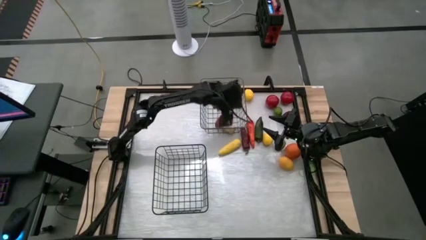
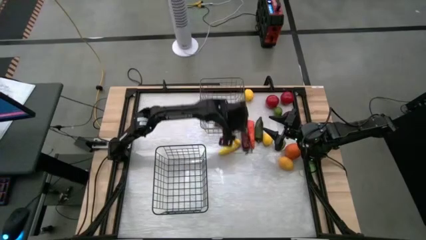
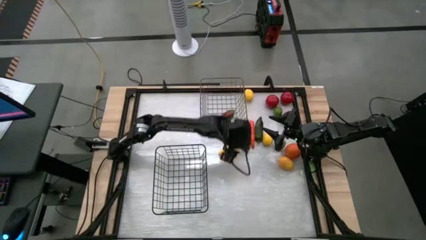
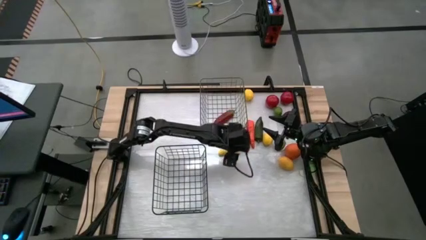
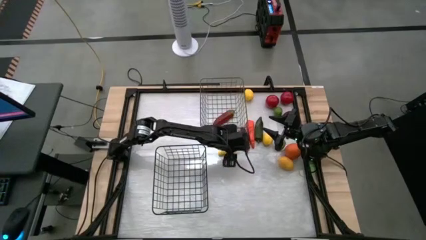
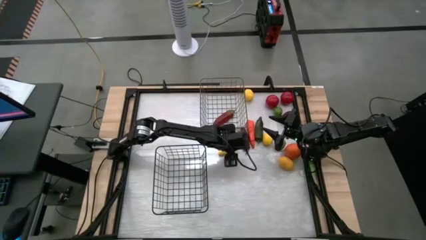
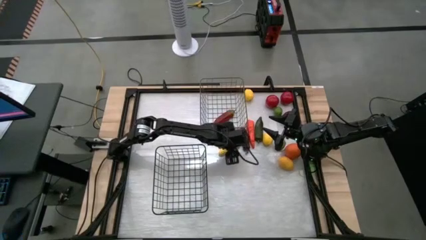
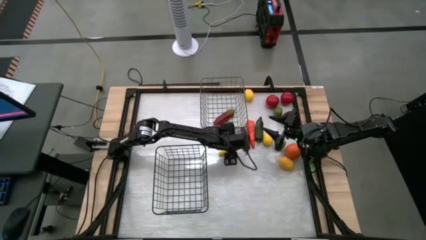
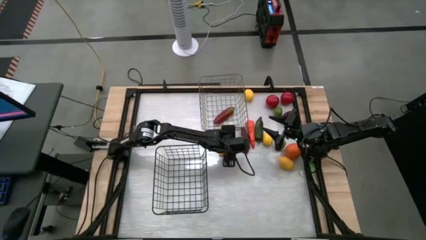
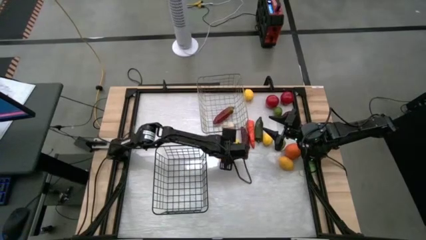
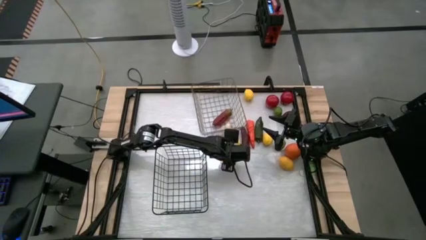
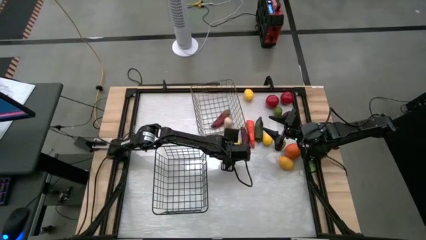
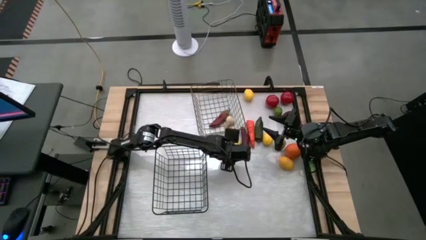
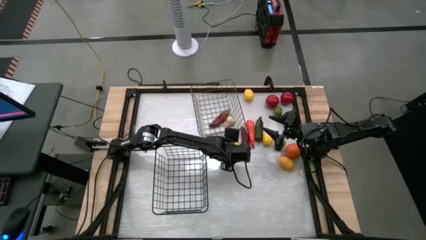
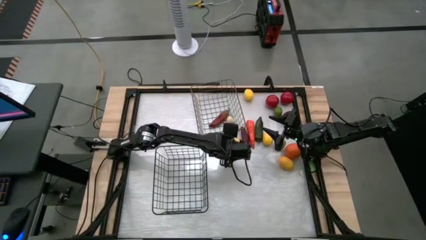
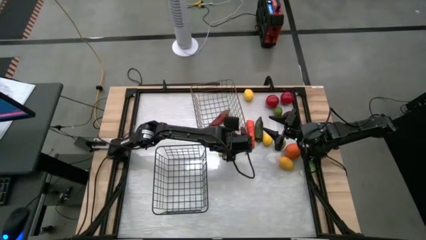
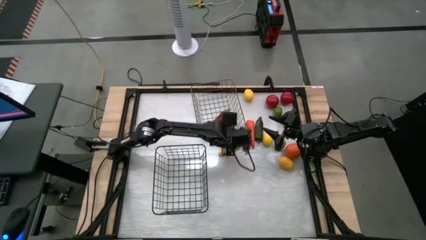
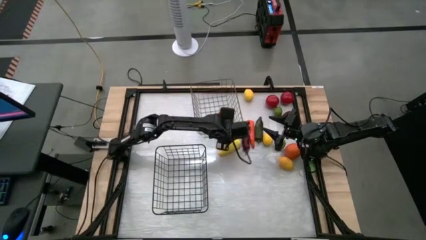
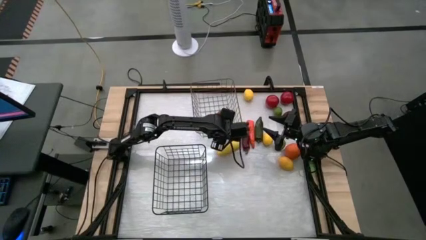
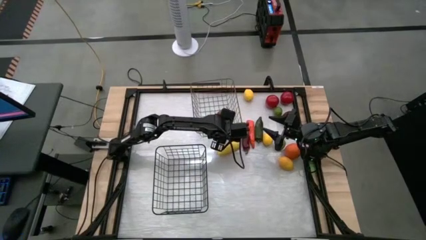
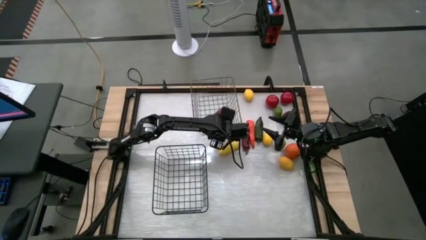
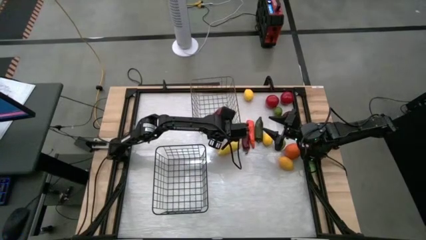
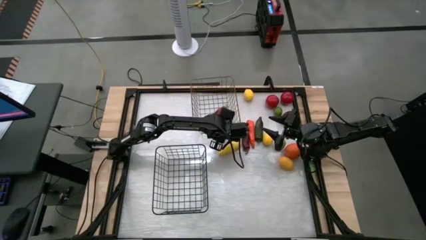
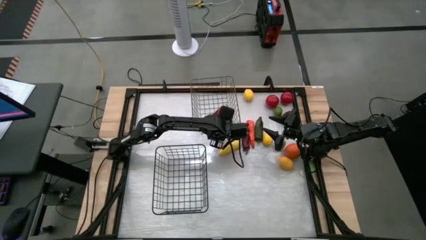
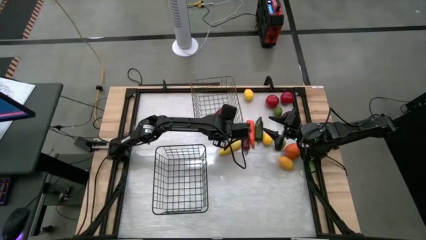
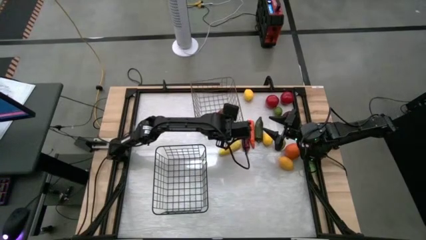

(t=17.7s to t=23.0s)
Task: Sort produce into baskets
Adjust the gold wire basket

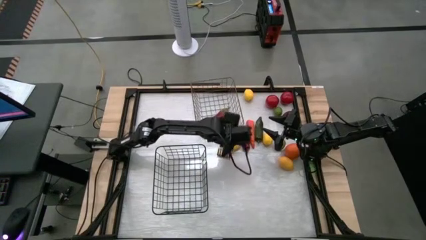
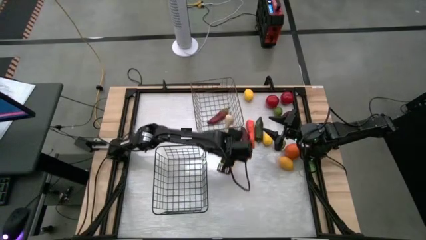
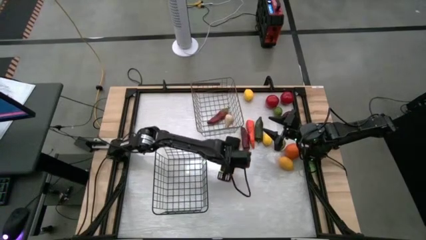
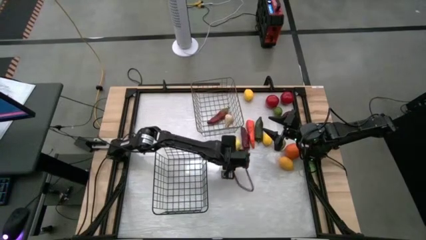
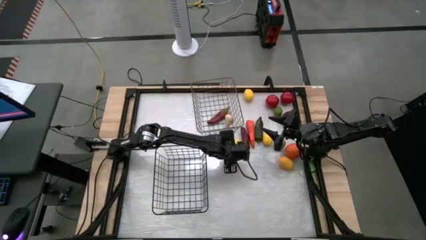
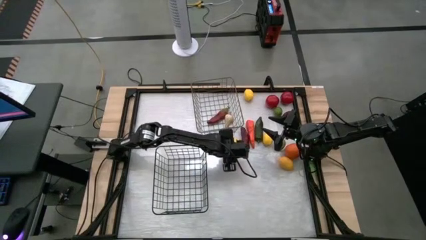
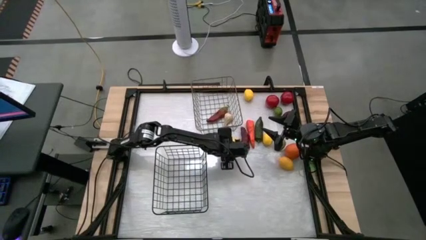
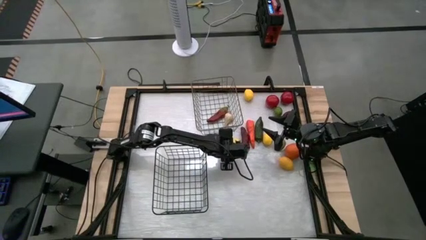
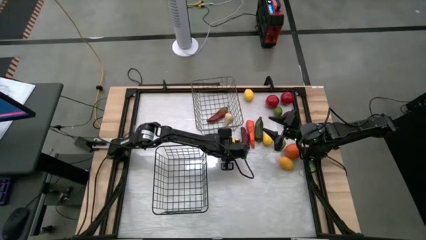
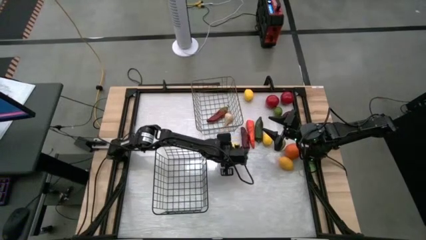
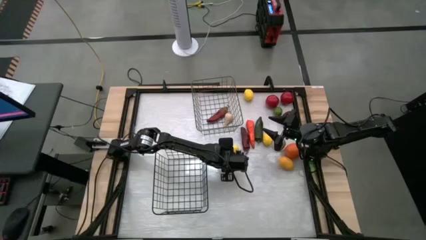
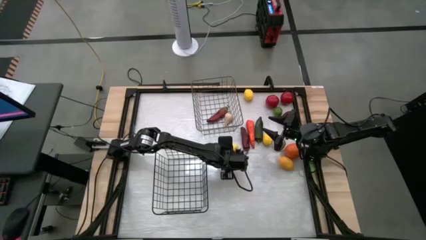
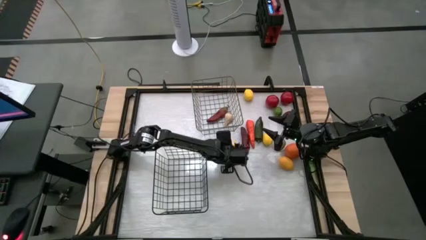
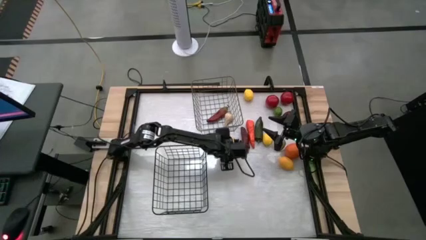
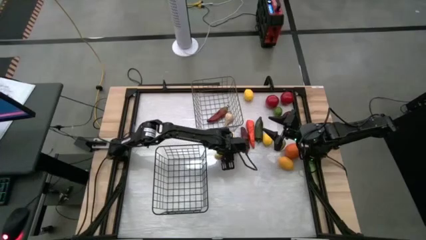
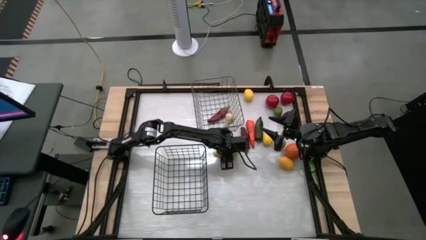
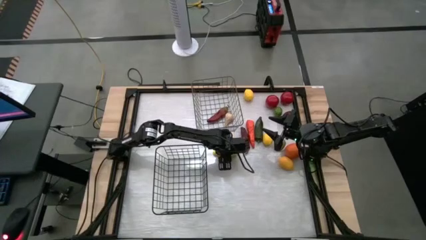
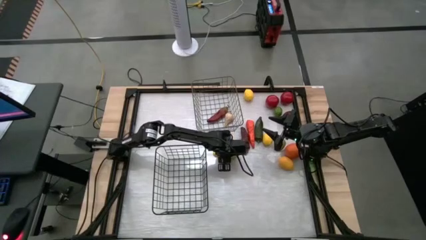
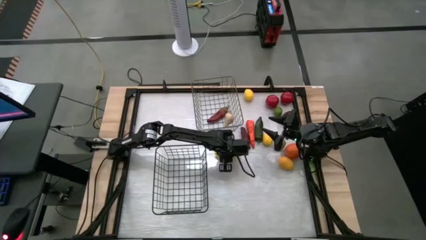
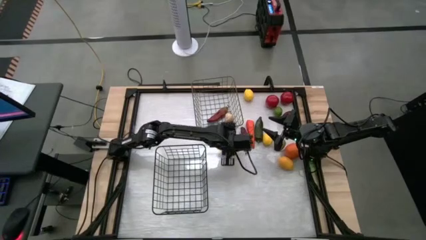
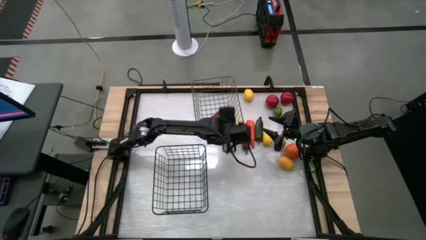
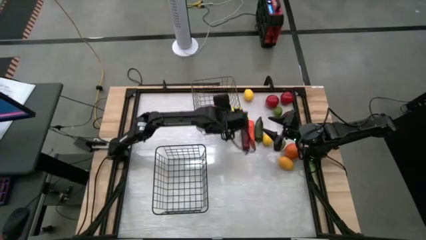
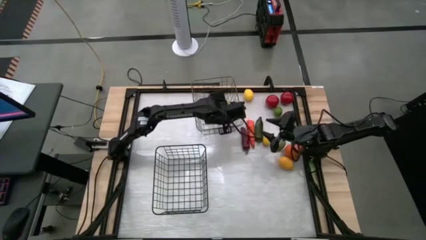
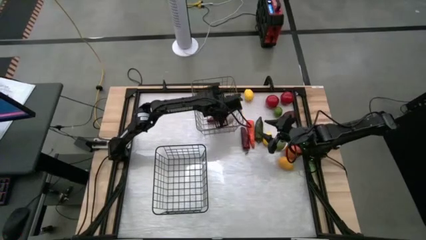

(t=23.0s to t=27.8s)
Put the corn into the gold wire basket

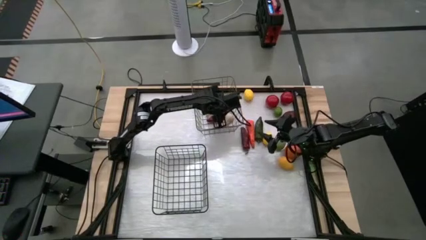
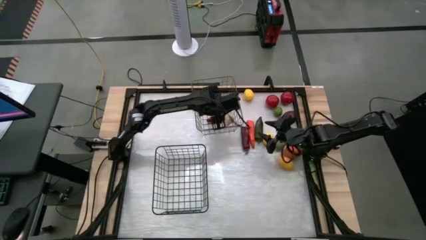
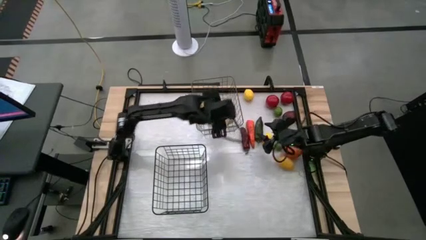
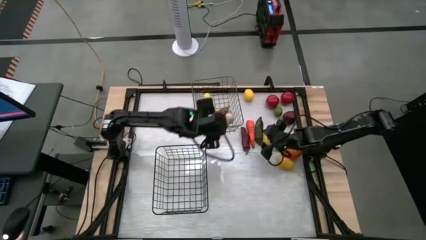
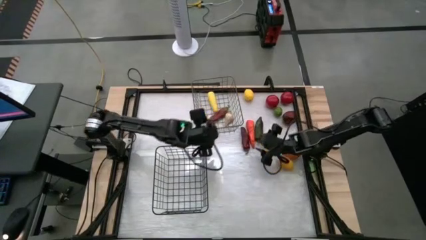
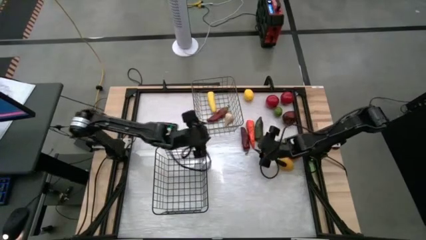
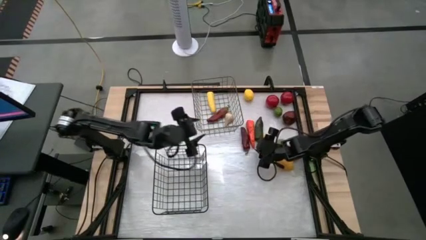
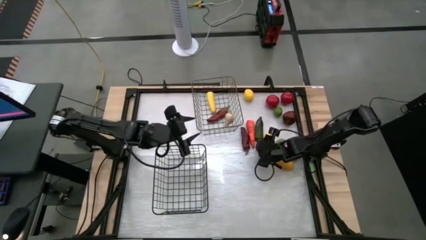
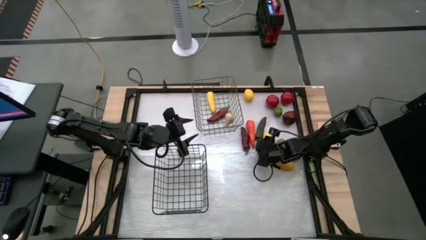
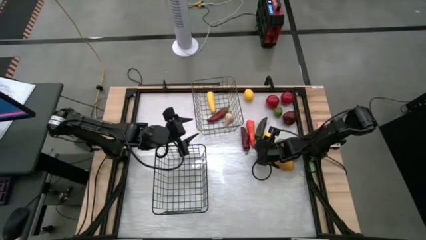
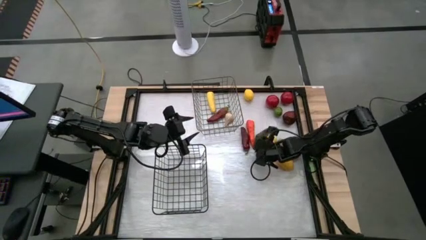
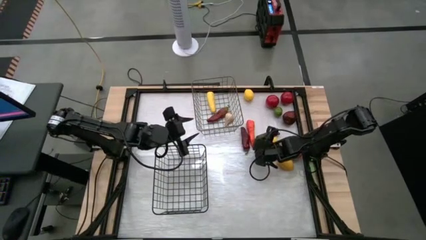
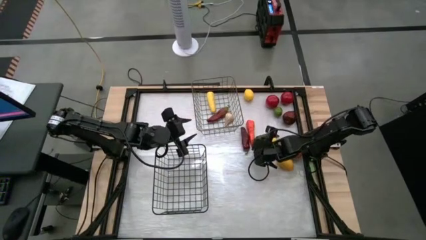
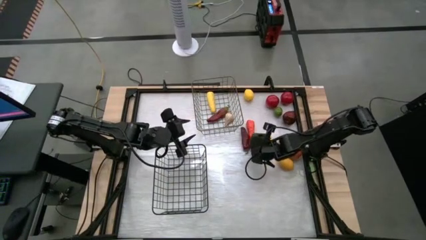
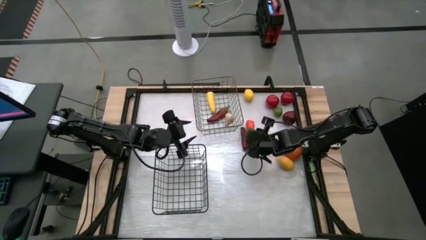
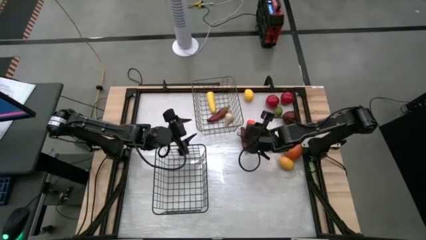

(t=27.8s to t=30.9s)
Put the green chili pepper into the gold wire basket

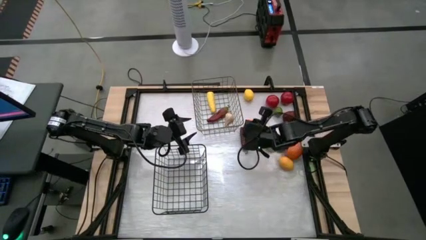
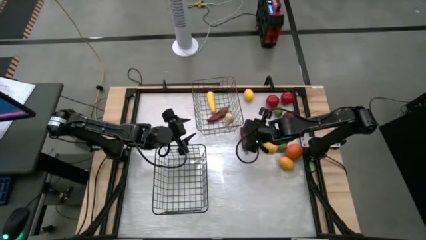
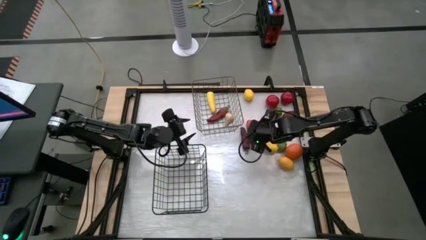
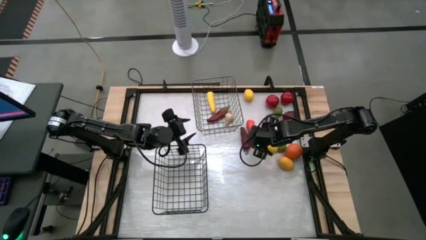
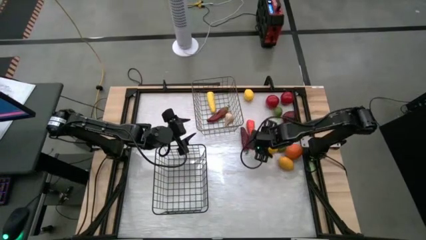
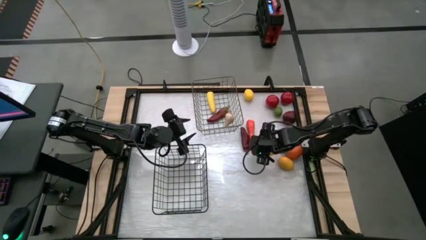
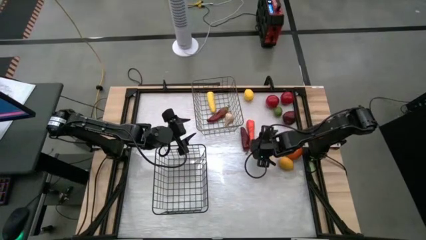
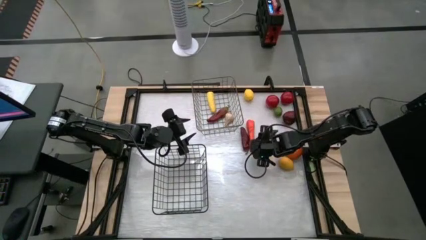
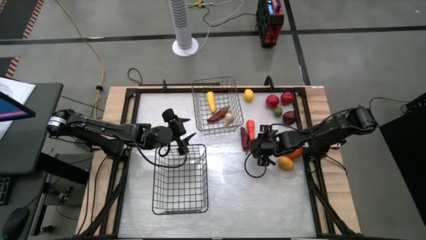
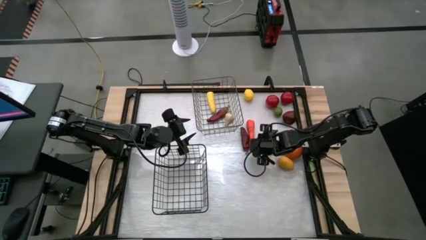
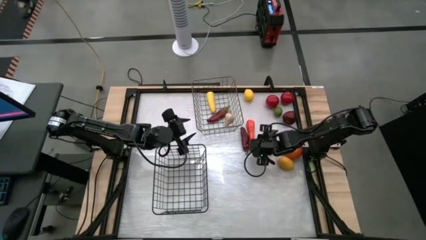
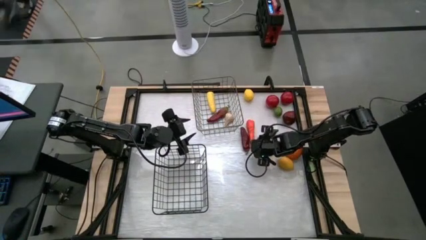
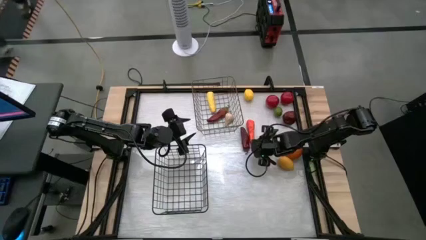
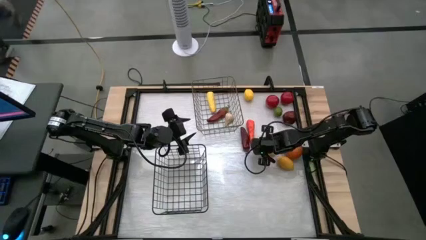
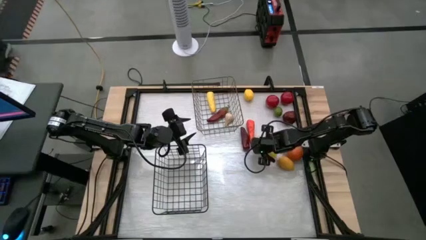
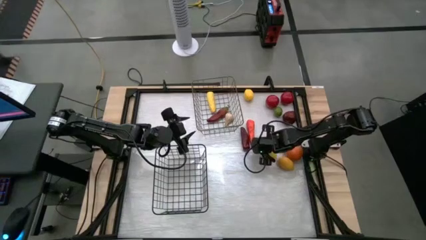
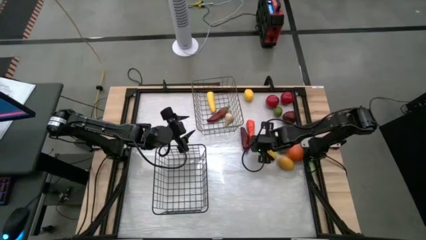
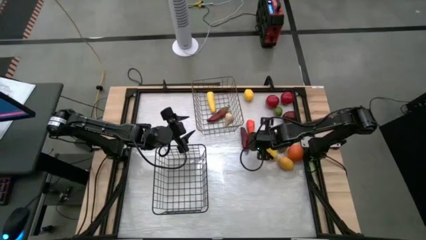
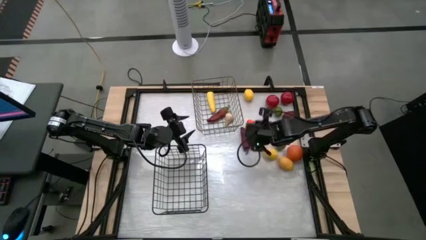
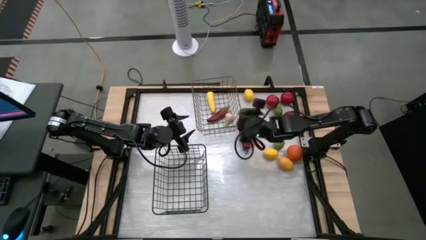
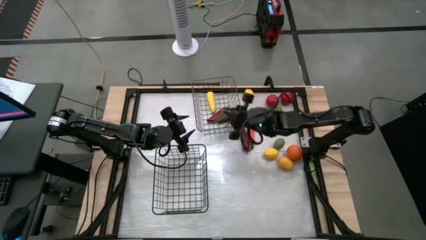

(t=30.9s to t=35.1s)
Put the green chili pepper into the gold wire basket
